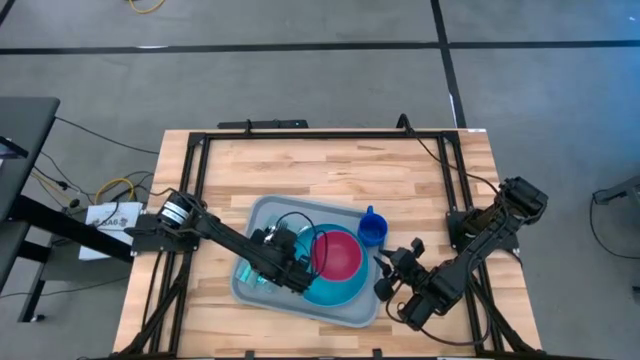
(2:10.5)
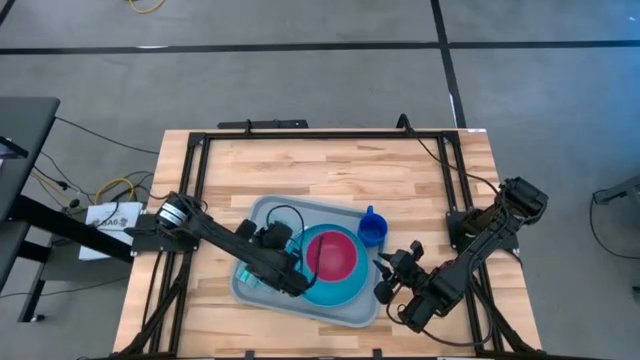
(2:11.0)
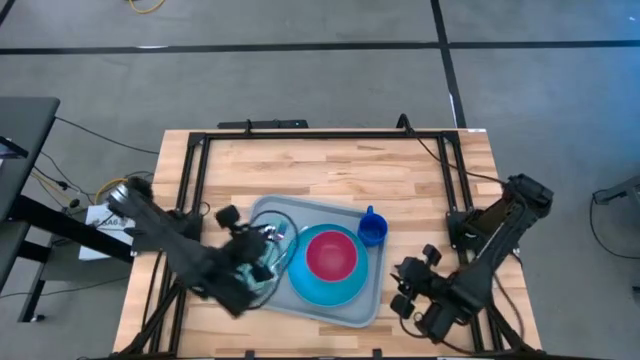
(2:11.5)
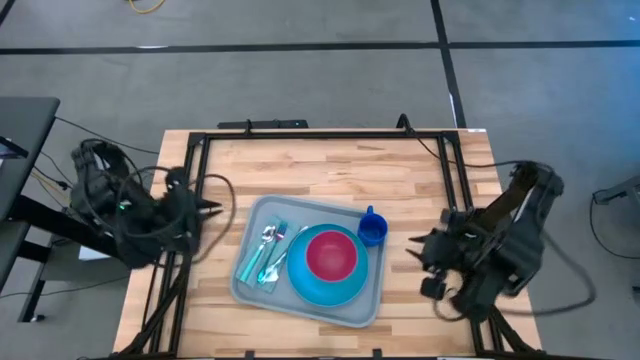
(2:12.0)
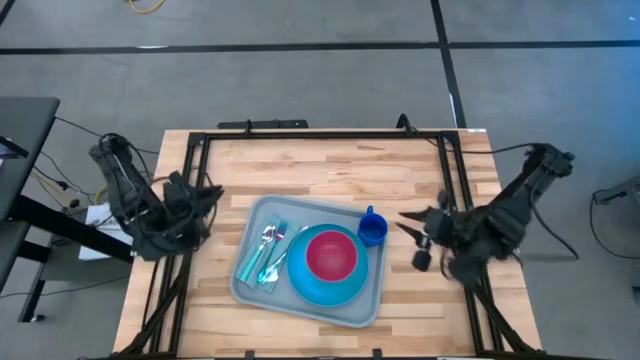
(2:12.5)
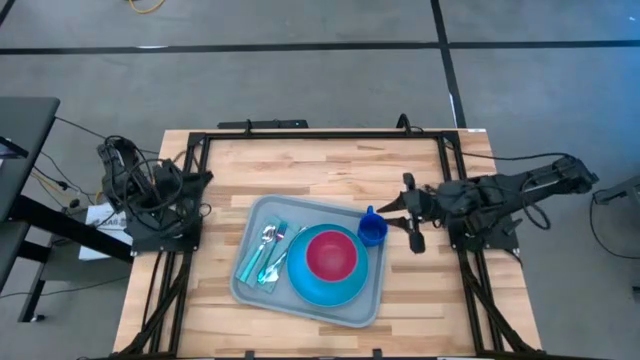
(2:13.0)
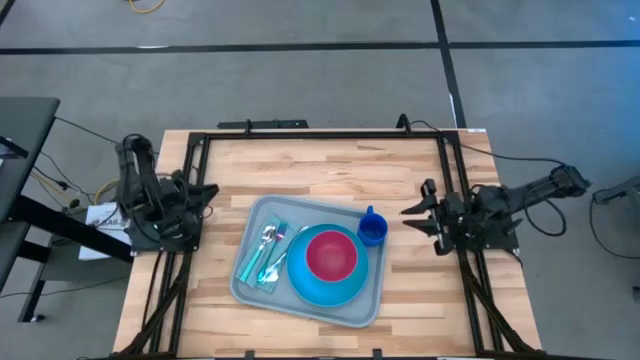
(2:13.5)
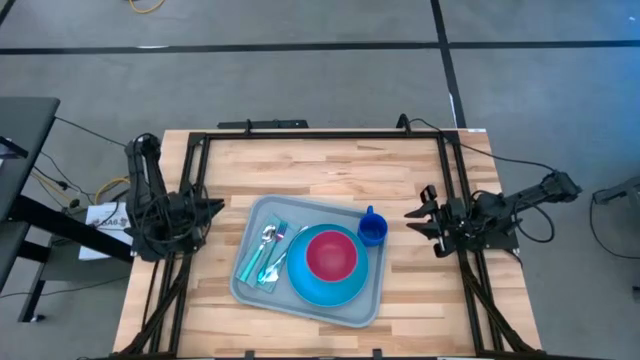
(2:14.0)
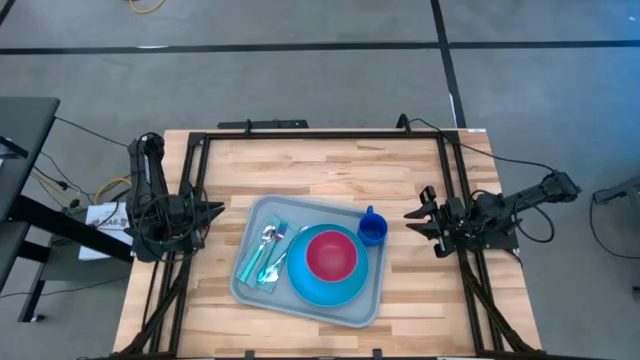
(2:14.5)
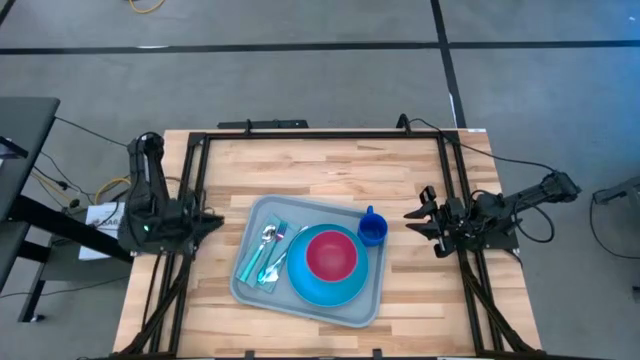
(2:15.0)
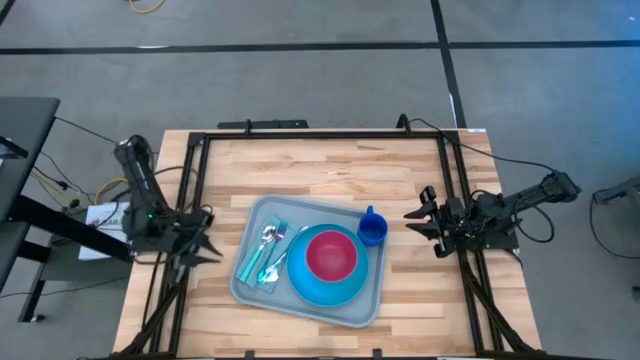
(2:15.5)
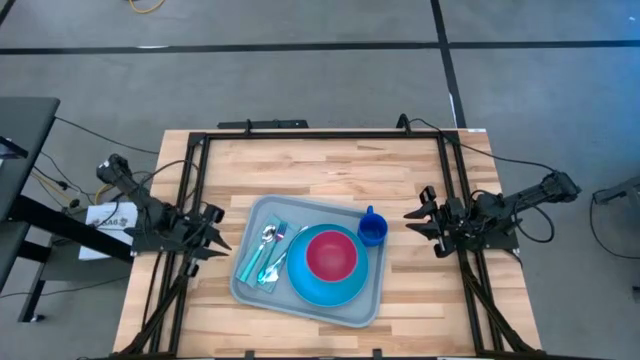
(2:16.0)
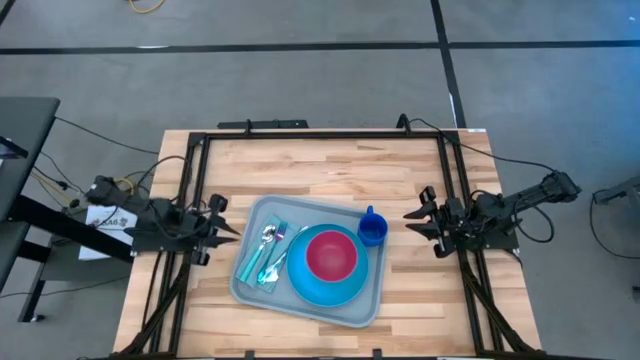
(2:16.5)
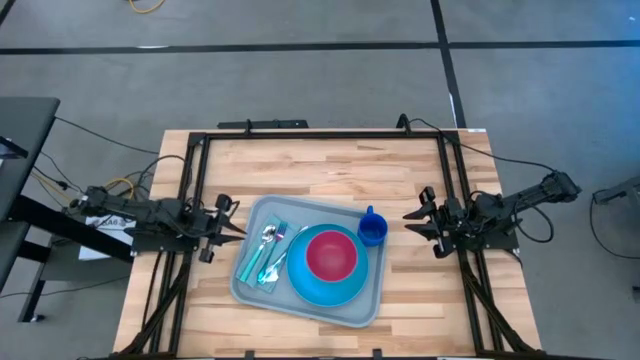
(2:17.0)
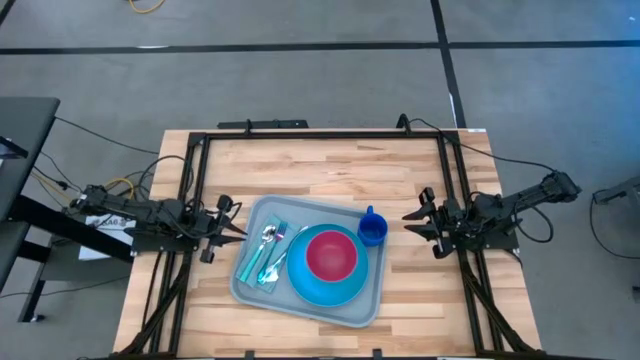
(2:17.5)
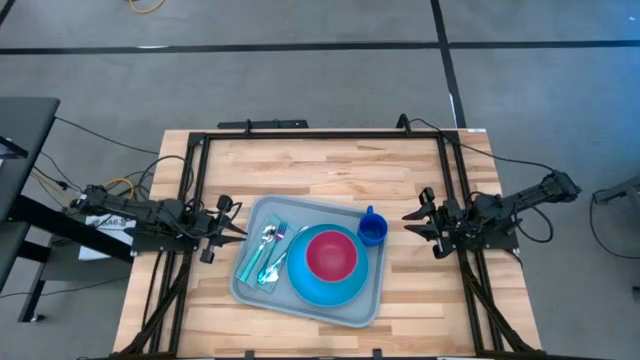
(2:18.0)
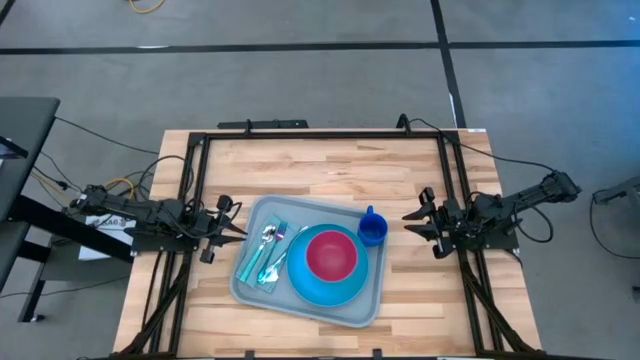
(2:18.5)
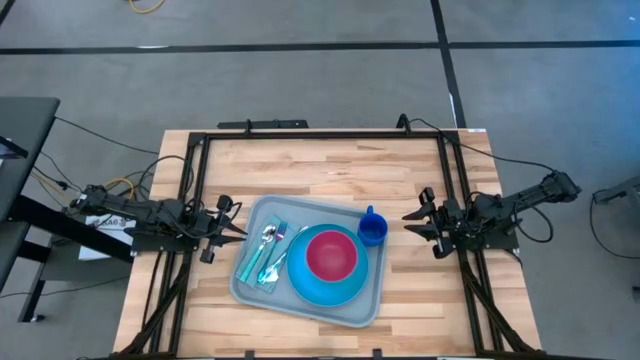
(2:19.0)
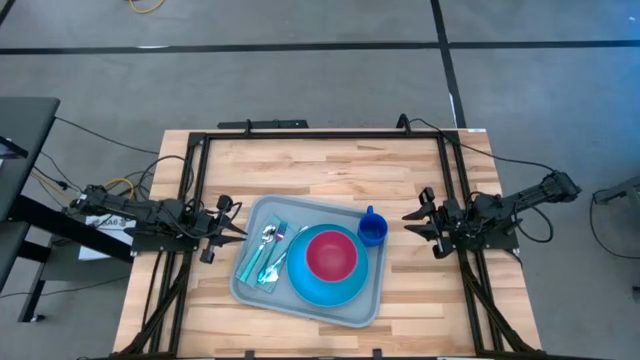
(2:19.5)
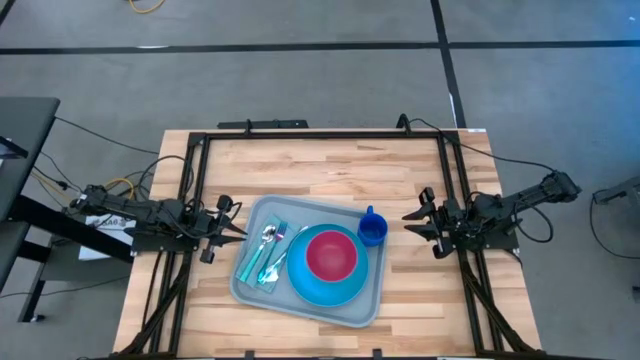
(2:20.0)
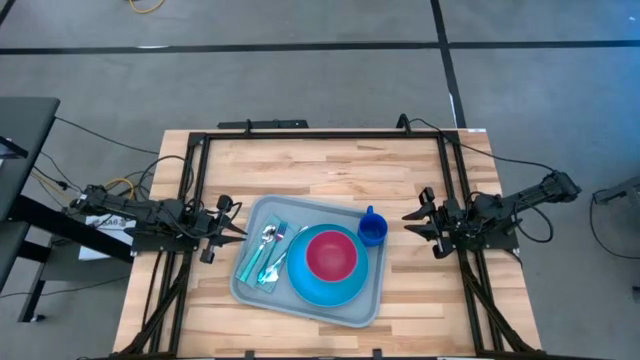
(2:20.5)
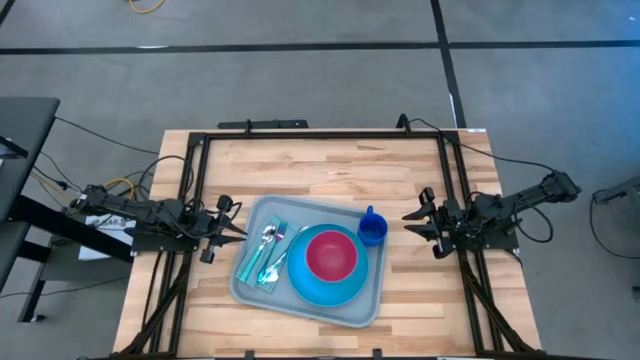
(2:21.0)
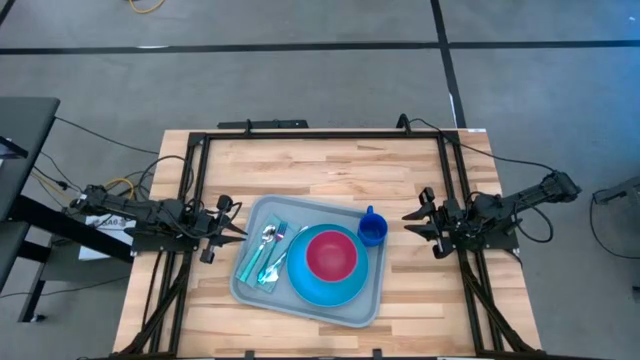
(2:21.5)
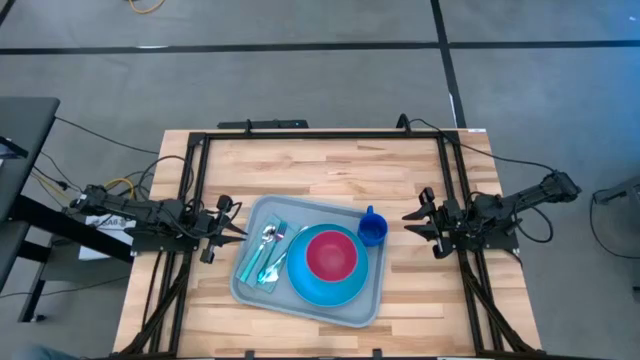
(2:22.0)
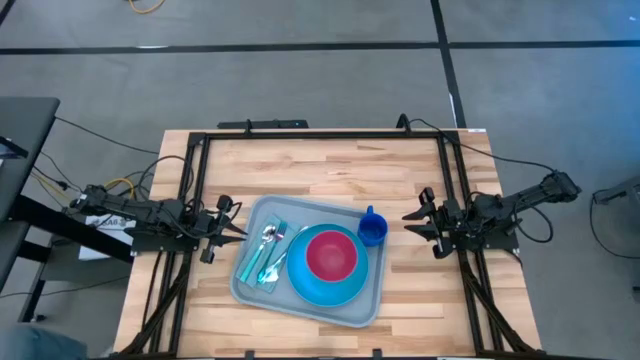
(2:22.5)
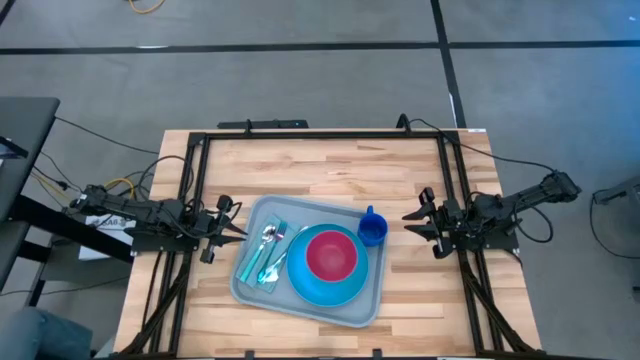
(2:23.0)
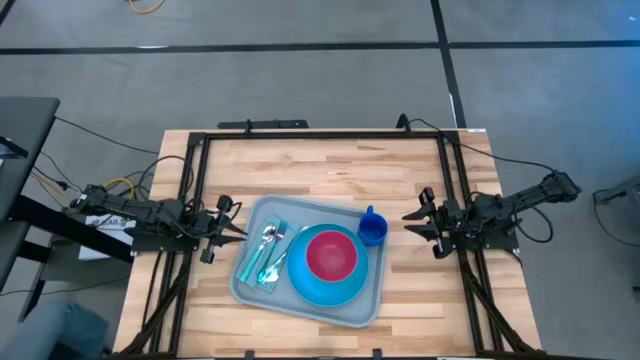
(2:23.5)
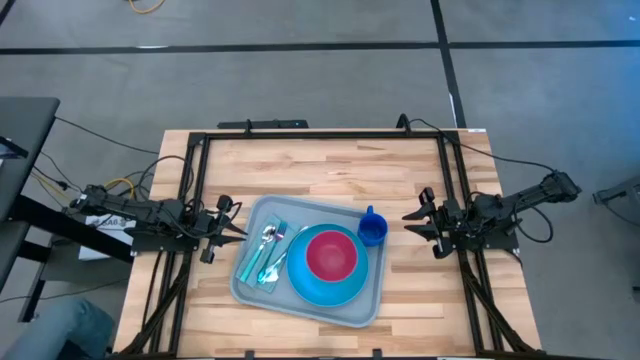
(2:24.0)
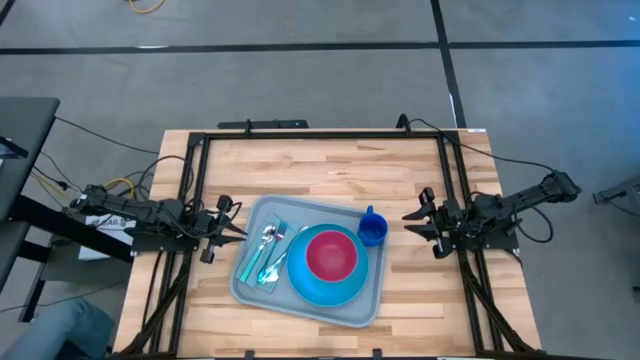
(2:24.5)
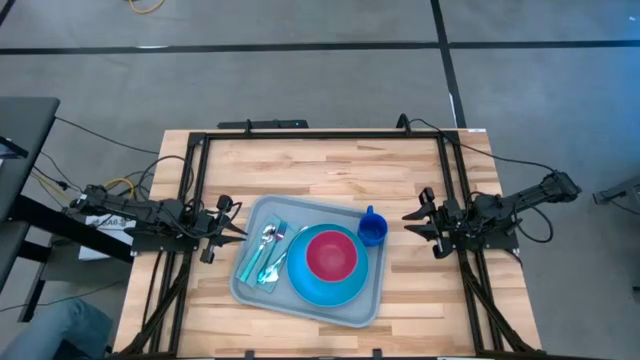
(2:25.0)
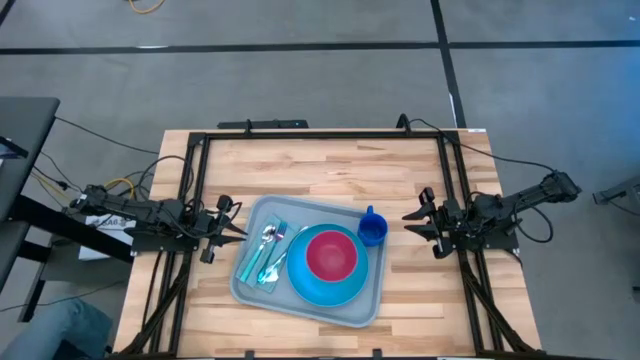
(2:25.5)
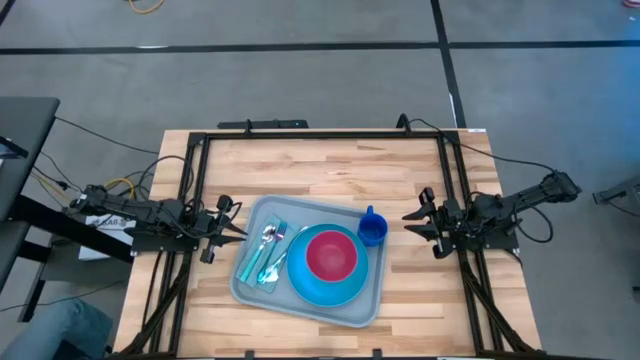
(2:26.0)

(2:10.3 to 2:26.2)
Task: Set up tray
Return to Home Position
